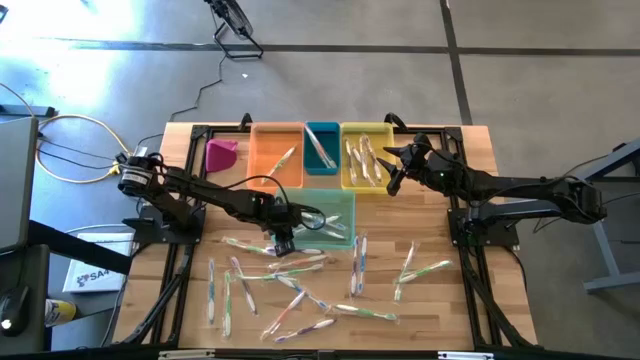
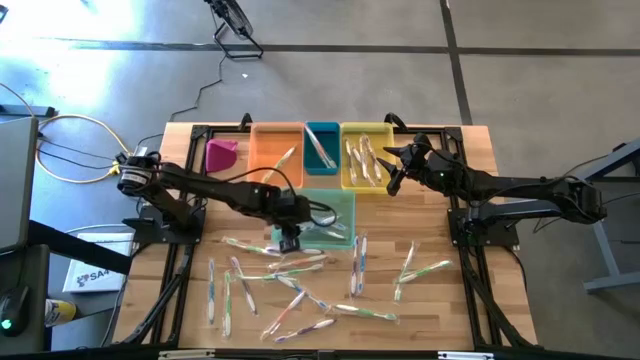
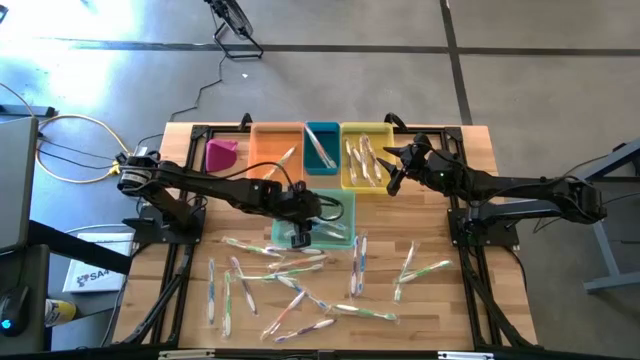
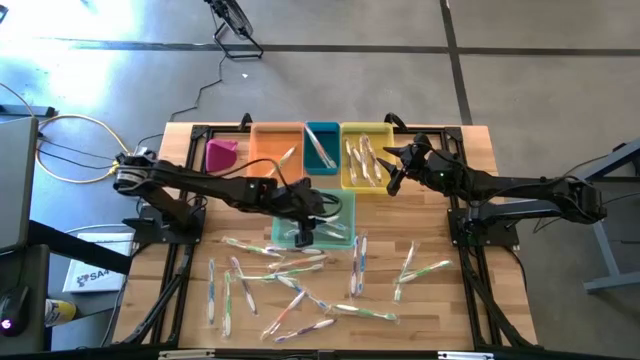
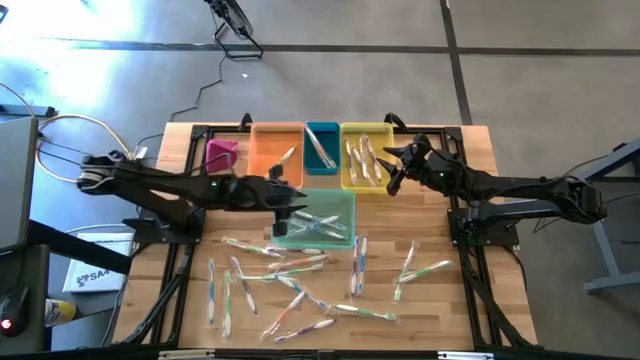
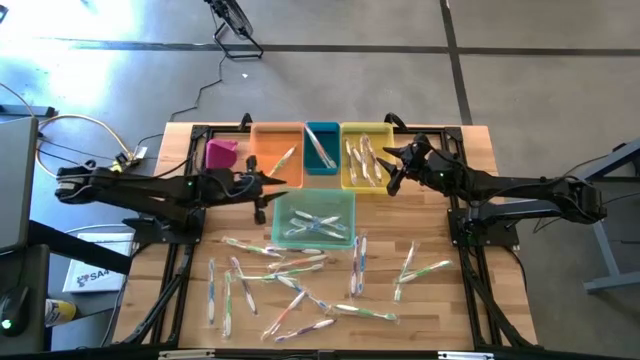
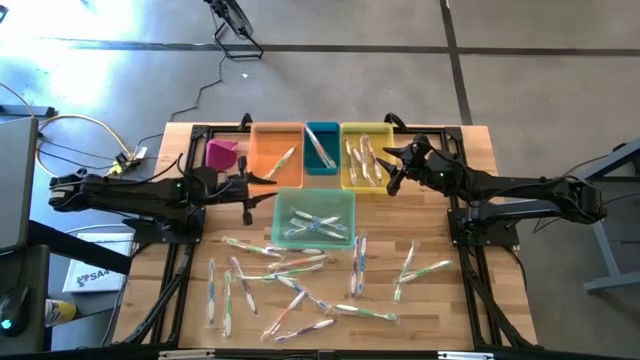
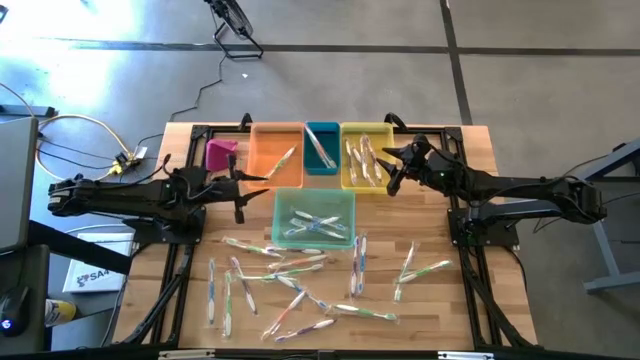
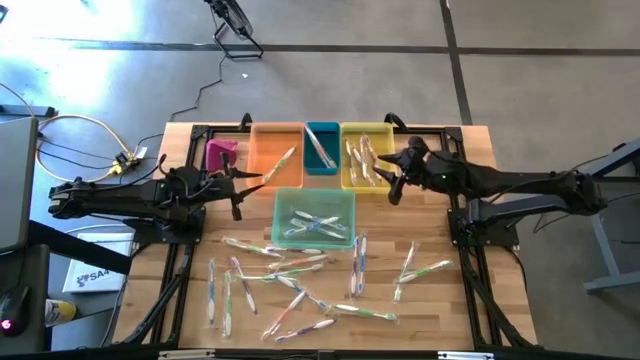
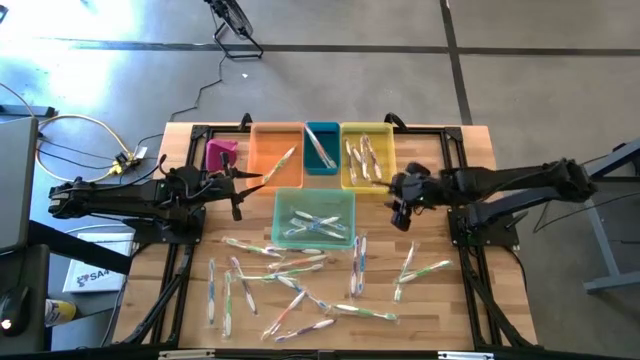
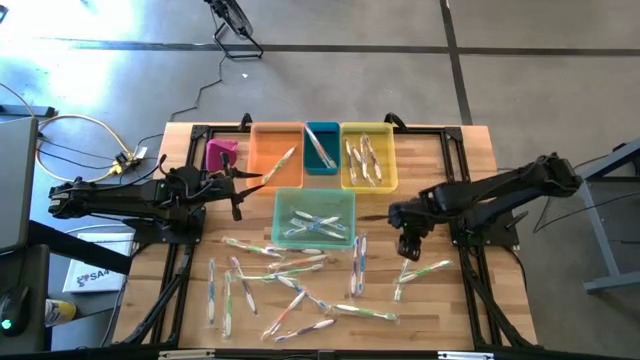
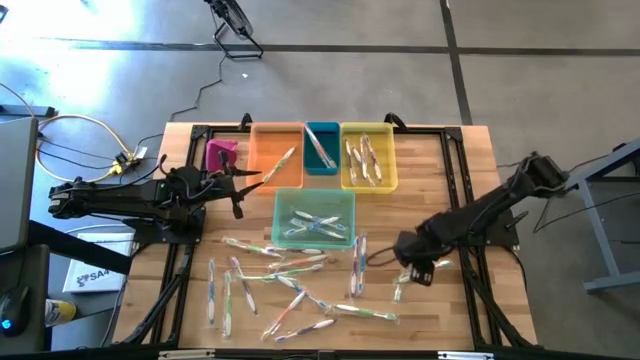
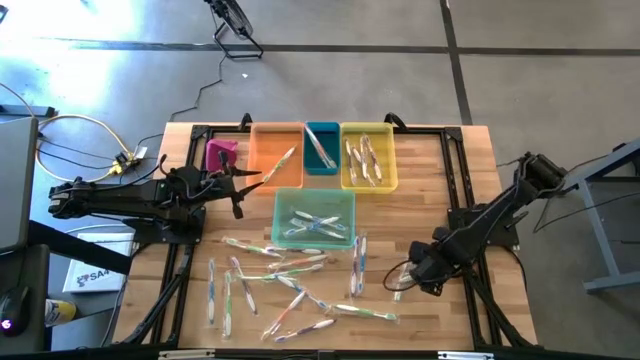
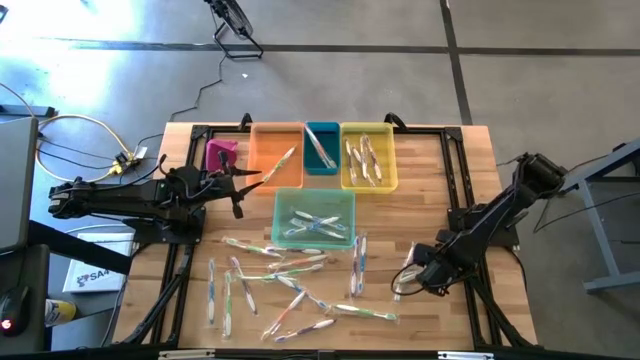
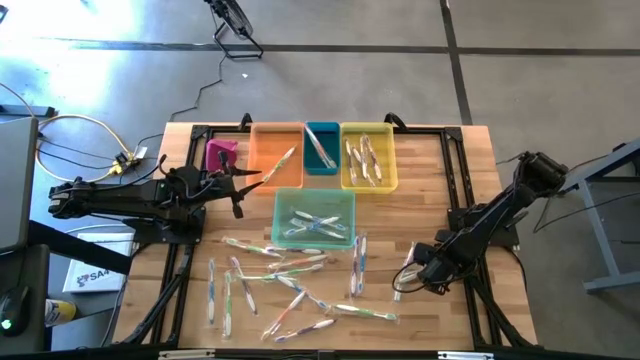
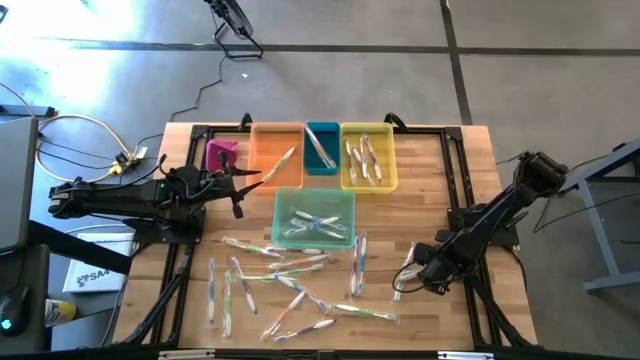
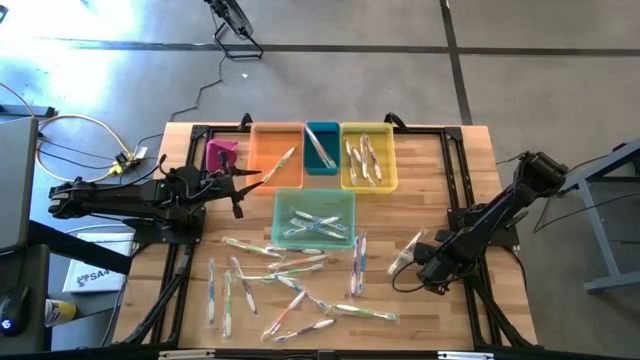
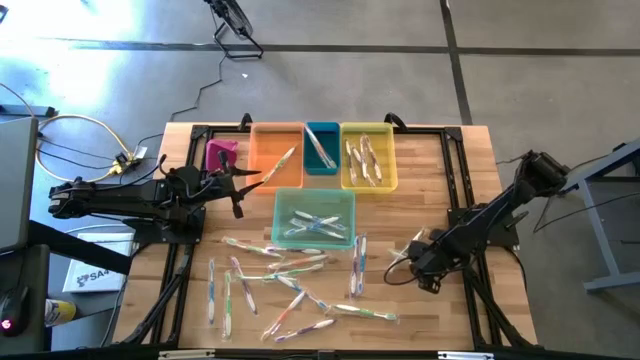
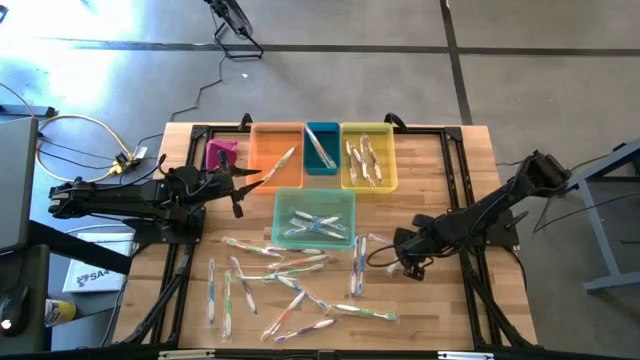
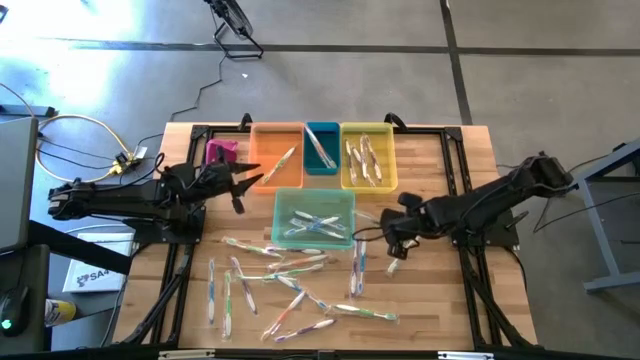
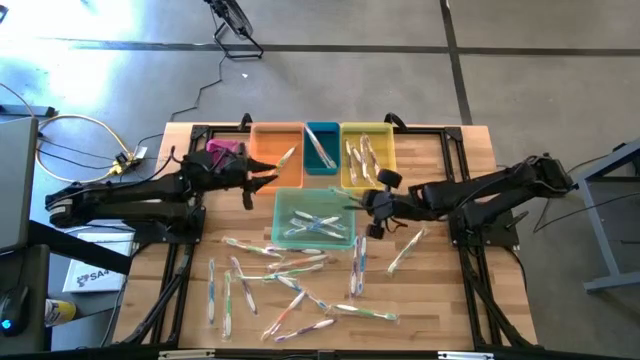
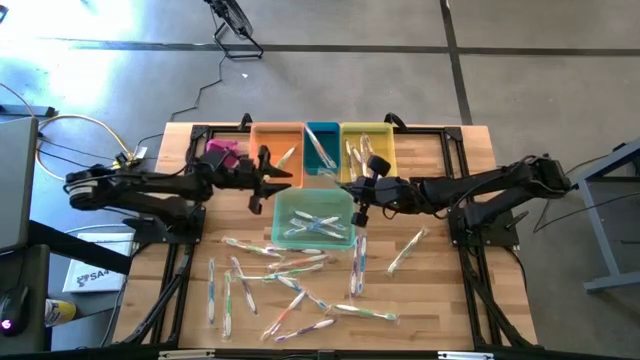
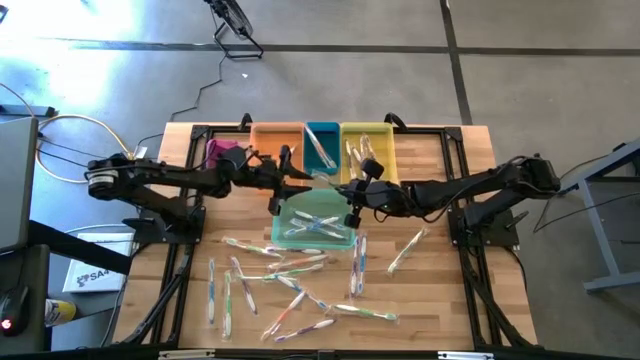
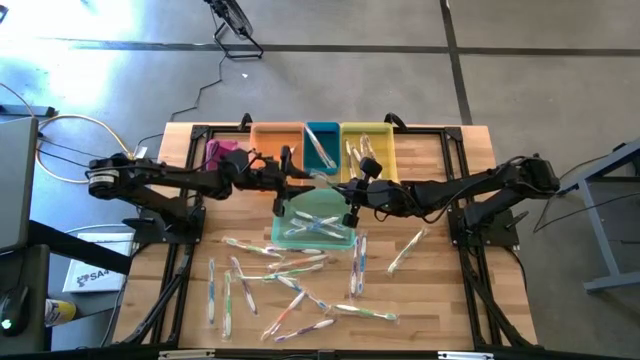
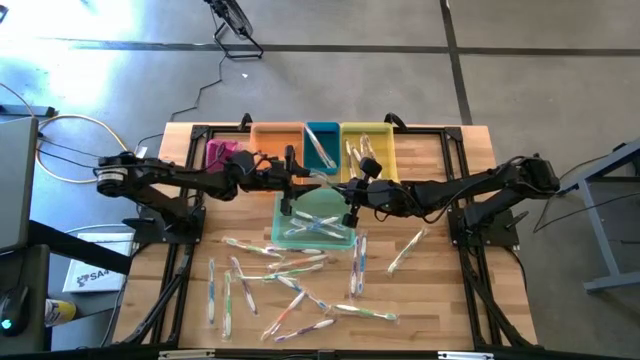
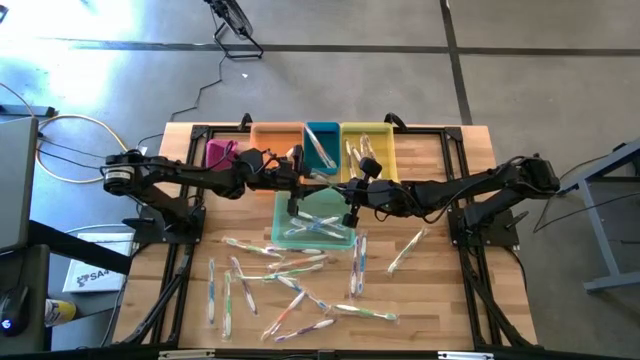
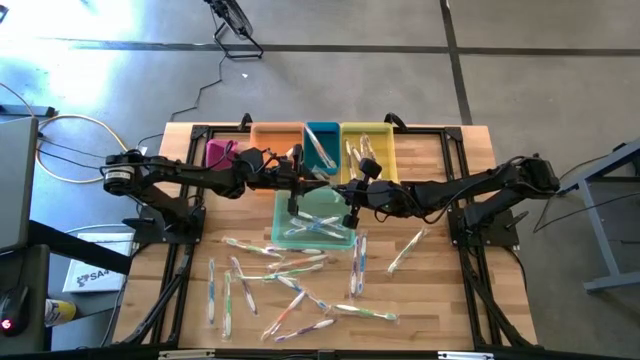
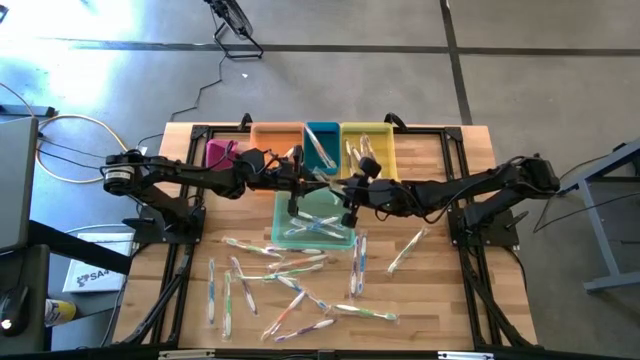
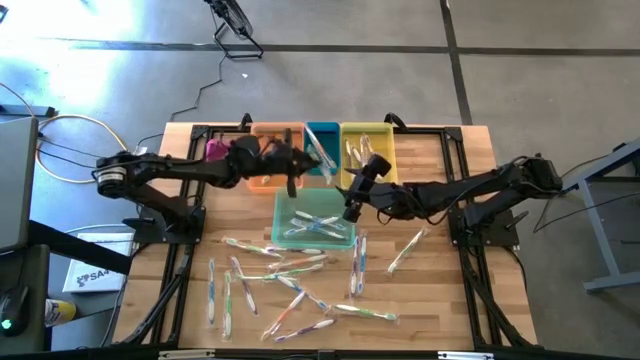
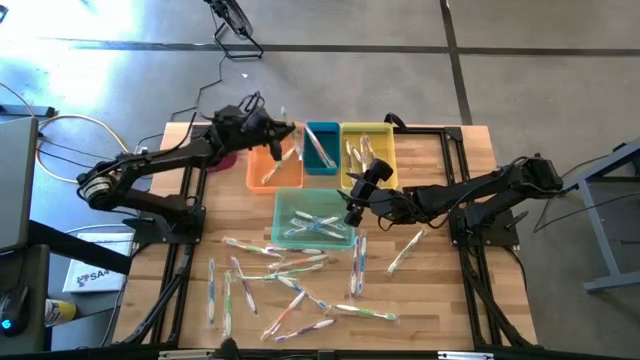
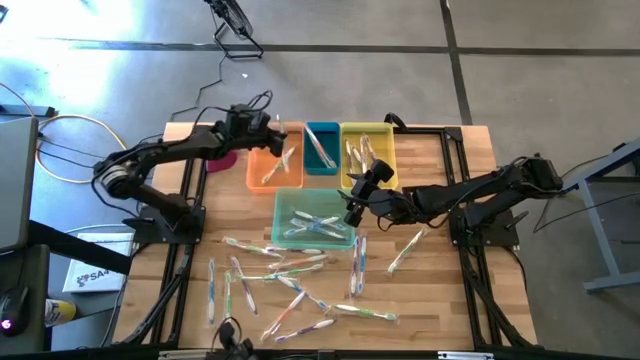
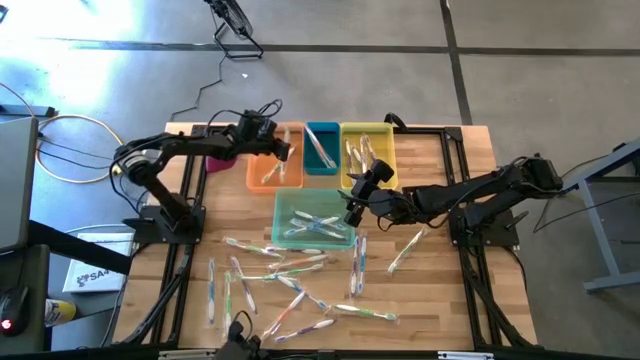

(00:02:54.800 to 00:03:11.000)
Task: Pick & Place Toothbrushes
Put the green toothbrush into the orange bin
